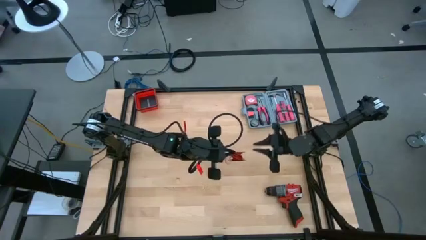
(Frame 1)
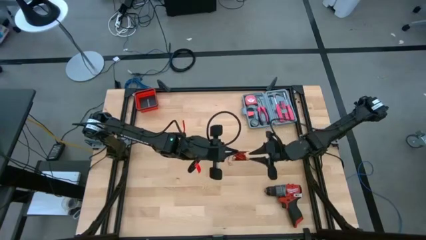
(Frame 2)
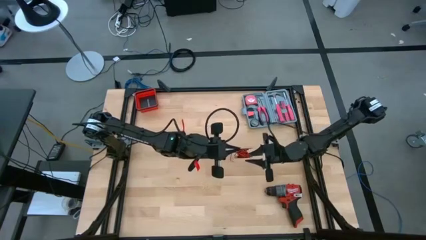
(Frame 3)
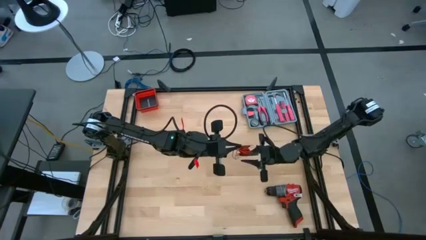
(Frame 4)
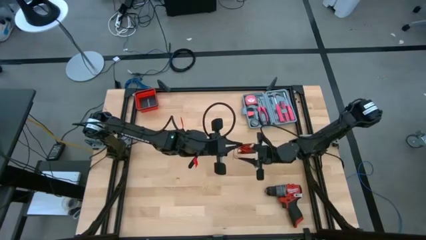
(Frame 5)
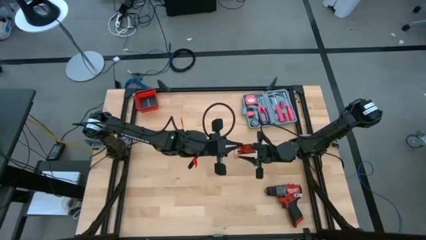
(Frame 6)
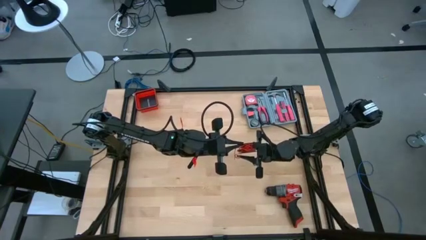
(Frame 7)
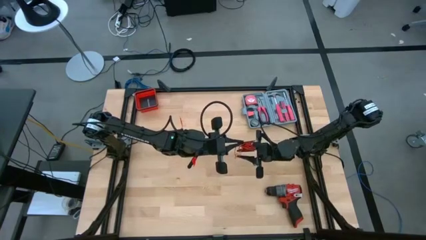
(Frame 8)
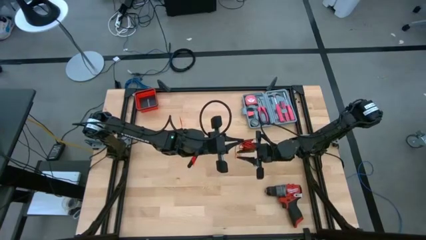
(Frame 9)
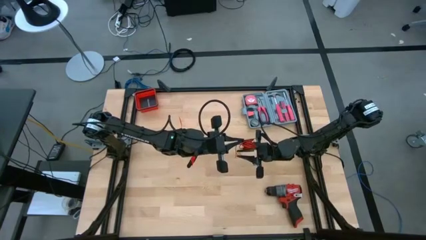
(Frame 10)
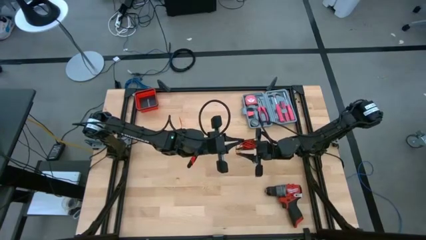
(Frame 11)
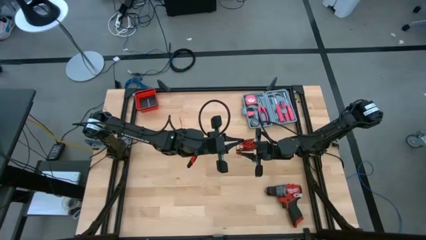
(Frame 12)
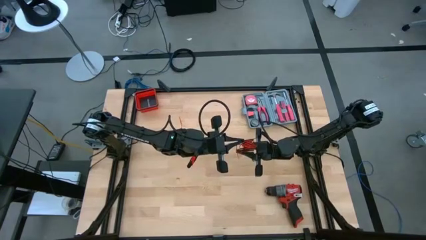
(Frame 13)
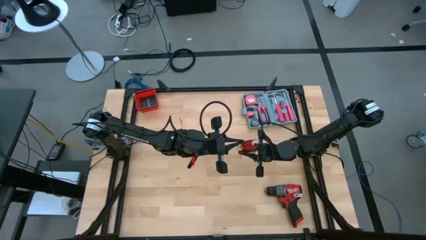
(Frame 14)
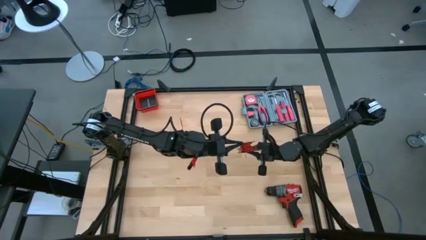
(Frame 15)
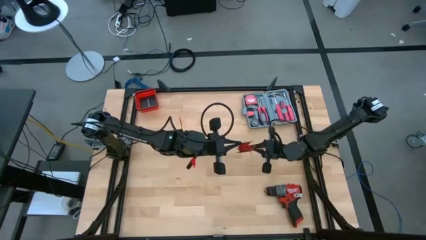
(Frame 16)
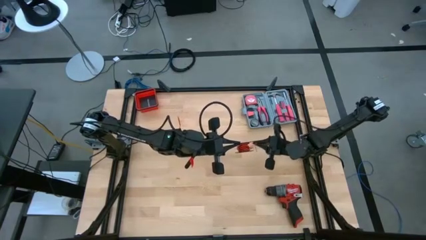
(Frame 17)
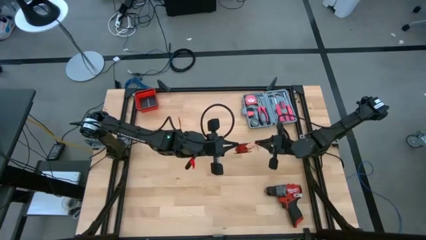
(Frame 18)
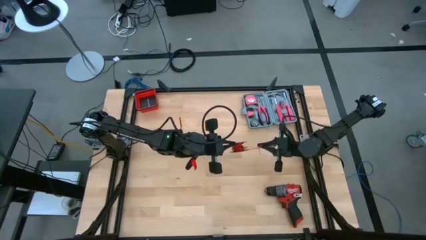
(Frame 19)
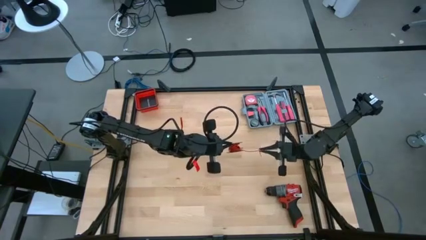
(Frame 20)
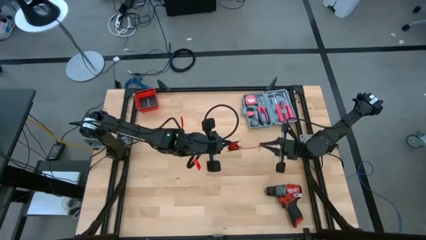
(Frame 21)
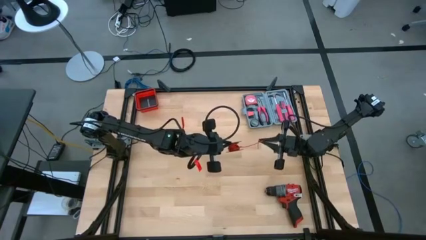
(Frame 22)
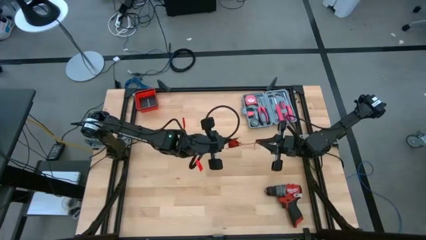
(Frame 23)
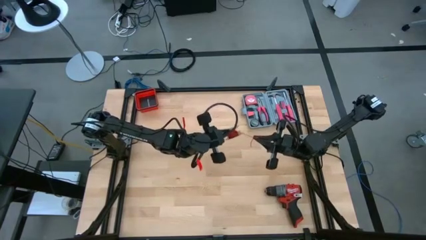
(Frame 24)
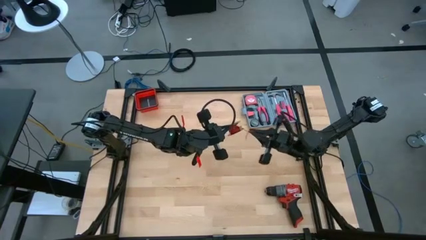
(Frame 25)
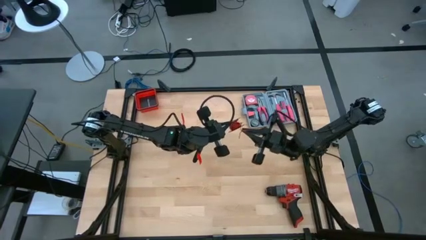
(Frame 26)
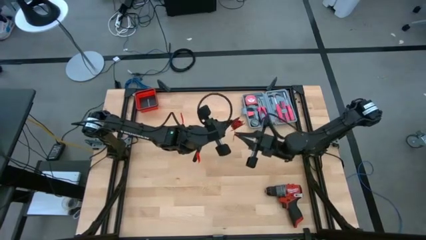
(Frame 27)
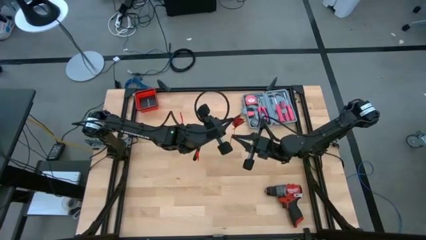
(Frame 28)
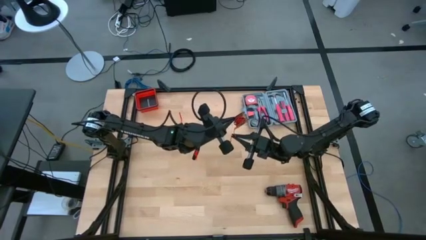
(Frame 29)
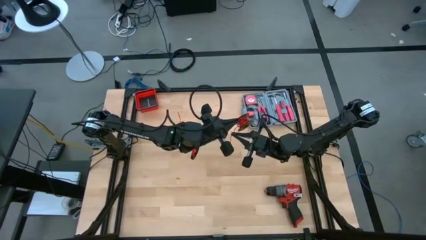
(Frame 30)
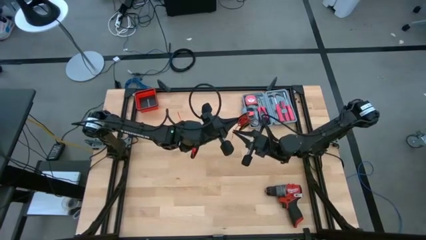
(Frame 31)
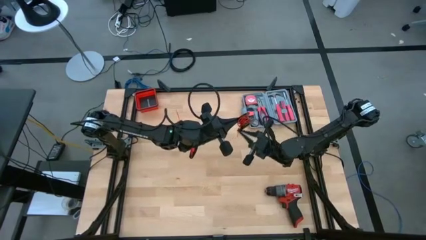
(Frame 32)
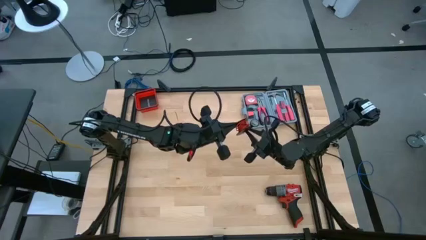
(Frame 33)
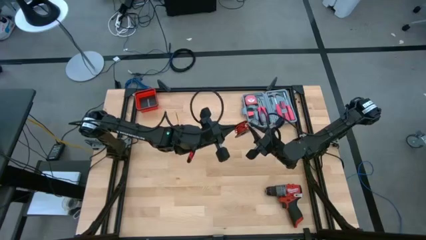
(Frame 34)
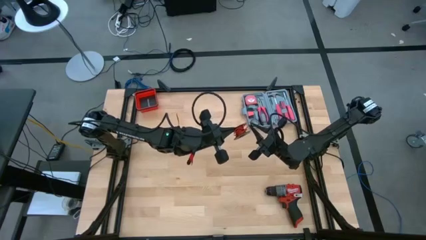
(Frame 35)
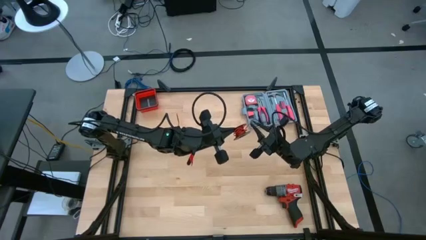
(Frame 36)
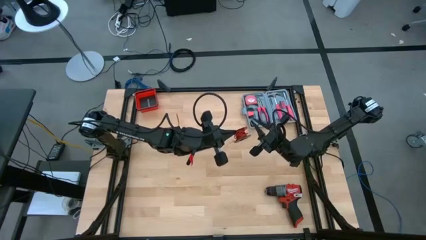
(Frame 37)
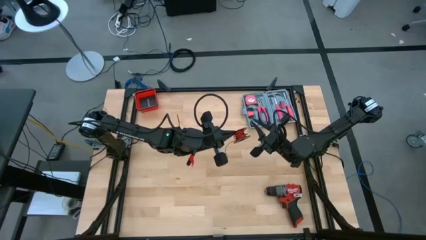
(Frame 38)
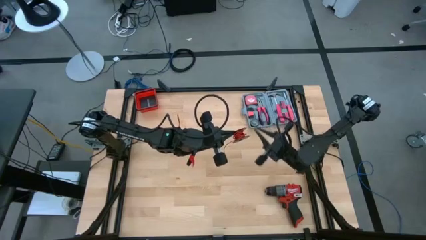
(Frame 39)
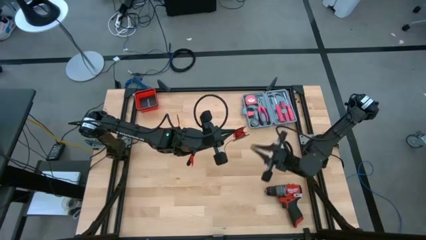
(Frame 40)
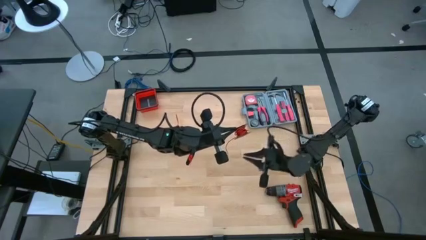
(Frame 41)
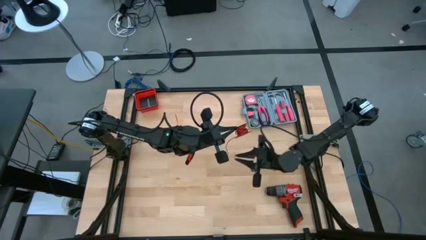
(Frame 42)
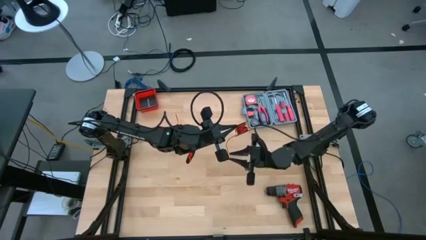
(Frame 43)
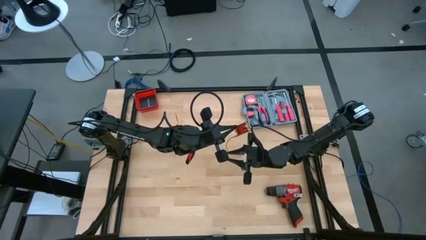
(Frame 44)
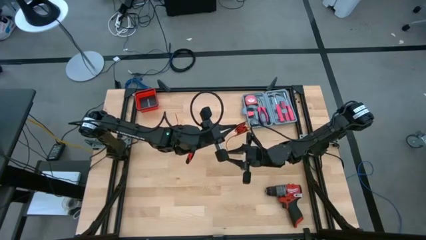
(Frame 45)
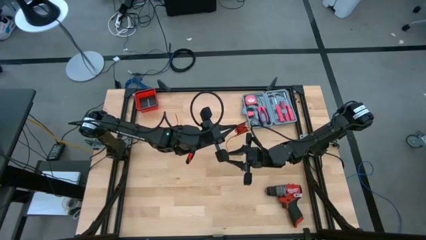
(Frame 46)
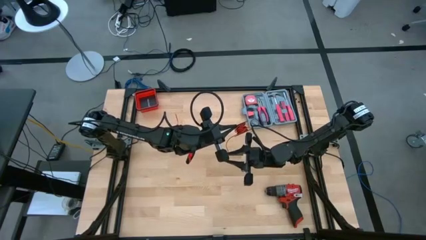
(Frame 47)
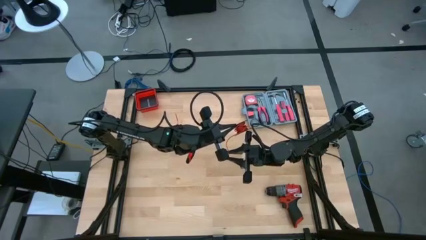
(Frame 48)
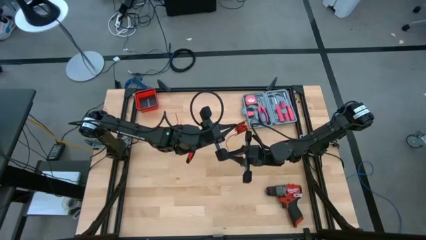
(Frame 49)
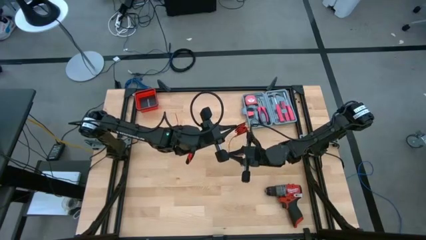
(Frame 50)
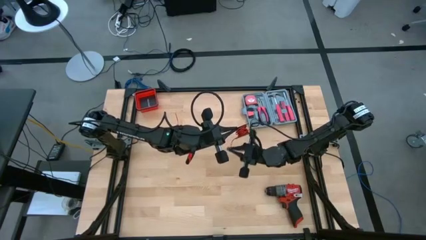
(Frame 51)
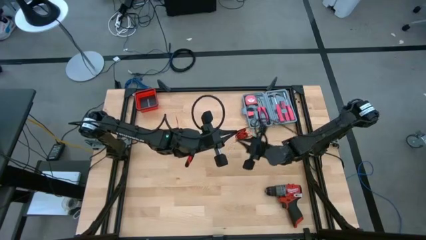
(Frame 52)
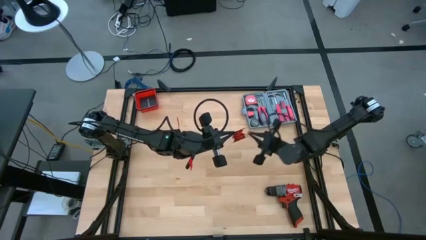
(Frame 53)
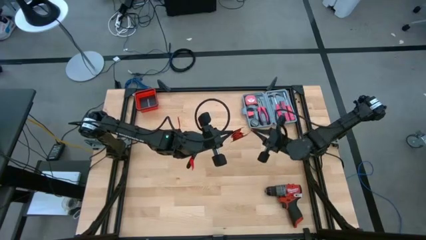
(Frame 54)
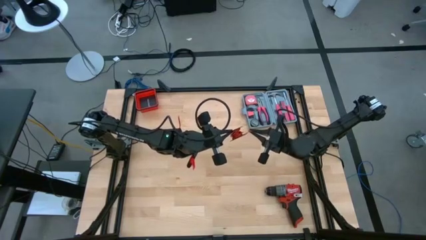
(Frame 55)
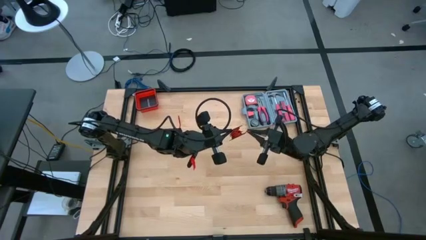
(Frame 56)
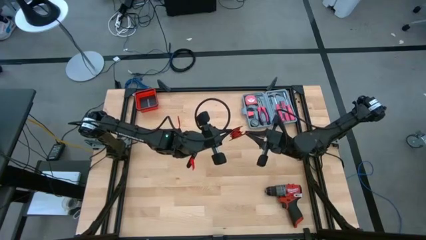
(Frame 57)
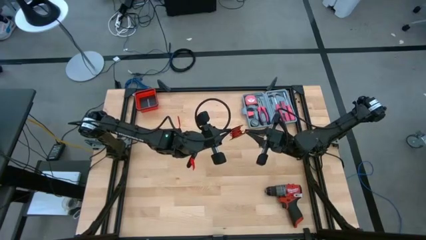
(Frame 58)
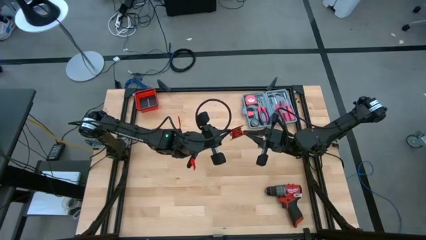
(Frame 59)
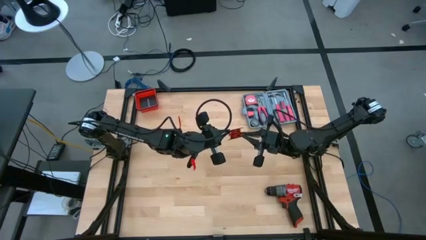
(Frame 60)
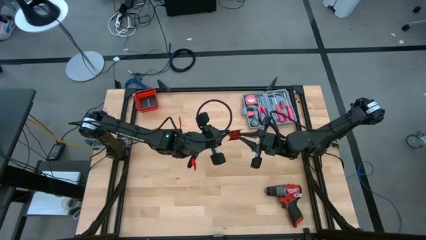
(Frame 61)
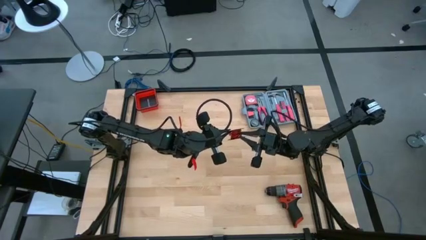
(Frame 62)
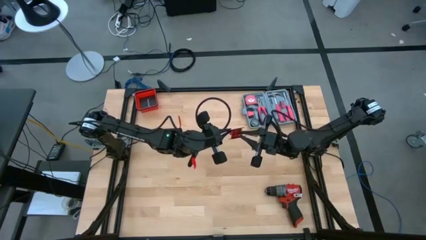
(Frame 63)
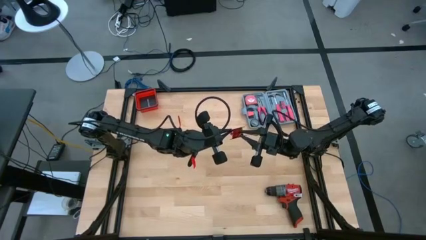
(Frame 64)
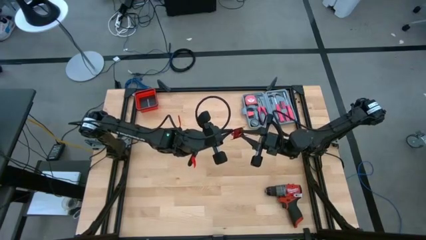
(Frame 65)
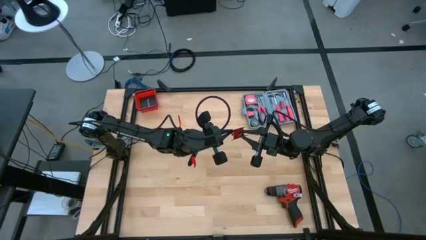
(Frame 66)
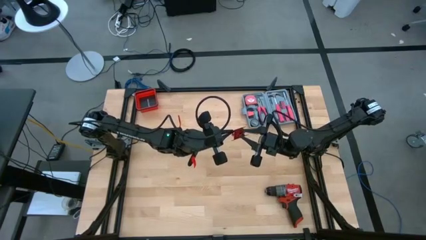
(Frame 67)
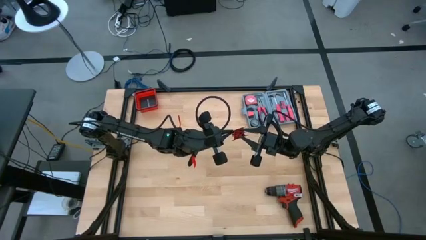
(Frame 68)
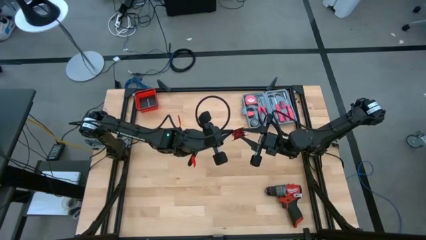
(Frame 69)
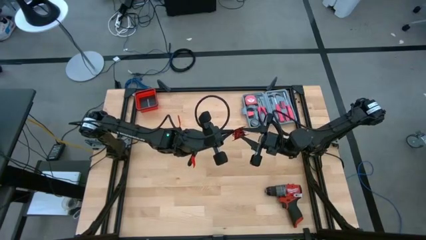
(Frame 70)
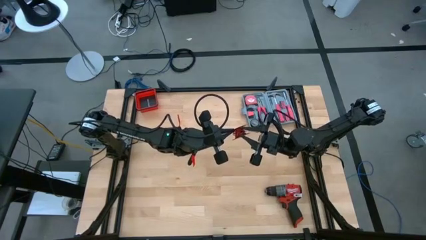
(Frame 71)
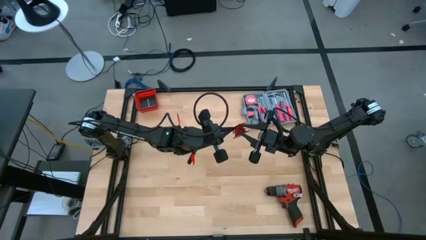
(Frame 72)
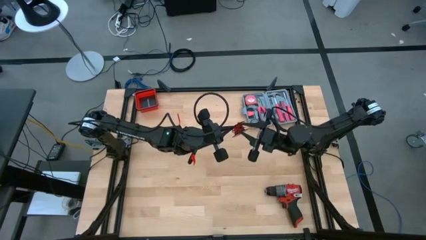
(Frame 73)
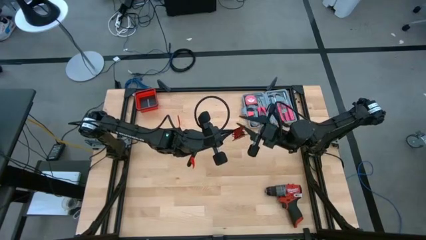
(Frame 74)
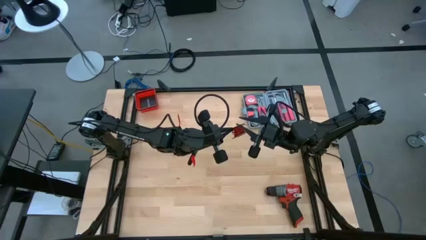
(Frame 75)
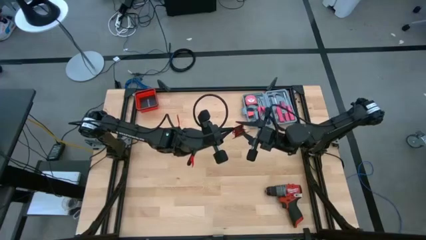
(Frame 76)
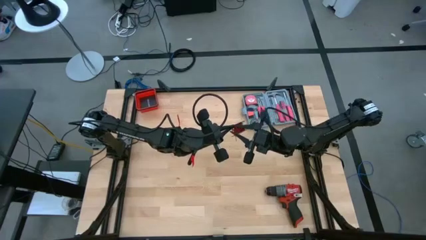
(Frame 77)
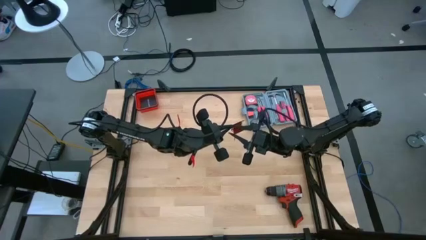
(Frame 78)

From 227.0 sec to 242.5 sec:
Task: Coil cords
Coil the red wire onto the black spool

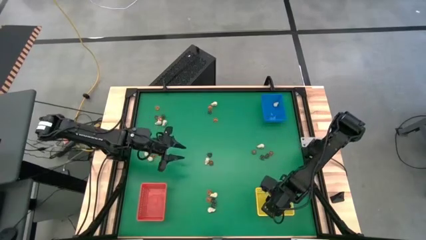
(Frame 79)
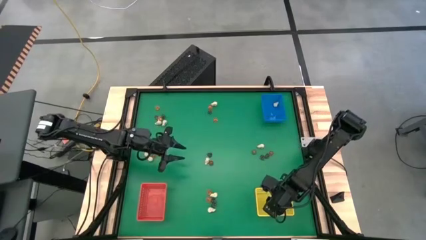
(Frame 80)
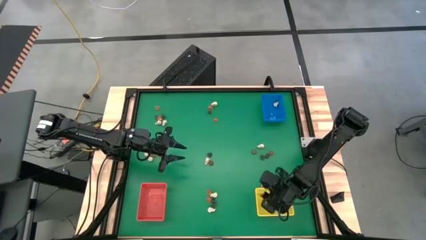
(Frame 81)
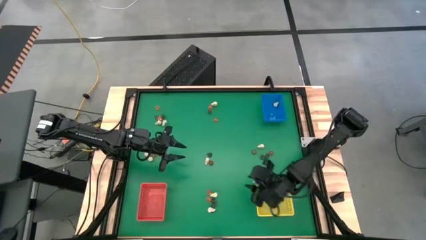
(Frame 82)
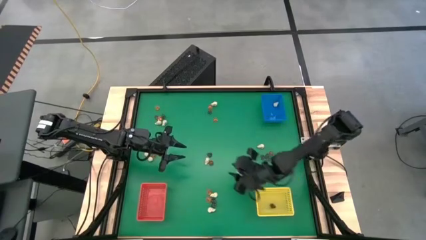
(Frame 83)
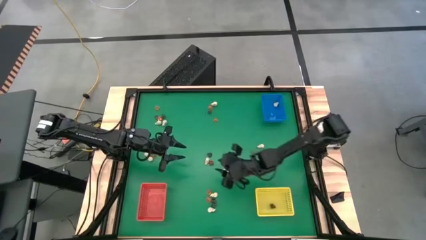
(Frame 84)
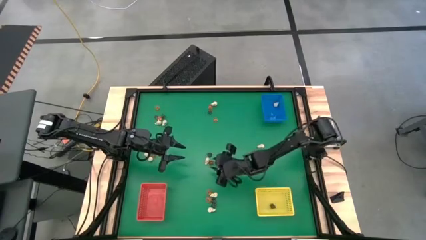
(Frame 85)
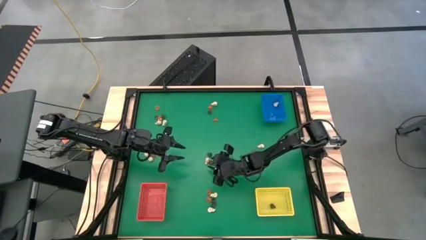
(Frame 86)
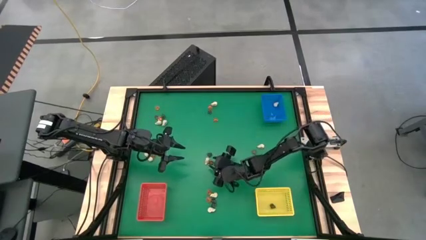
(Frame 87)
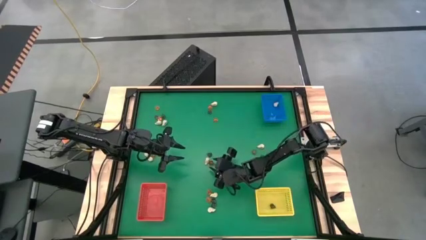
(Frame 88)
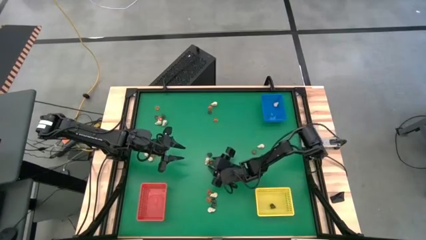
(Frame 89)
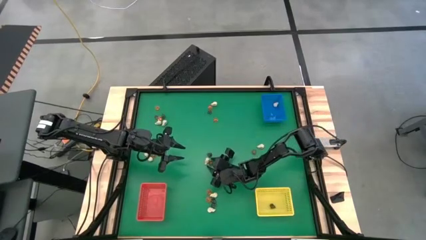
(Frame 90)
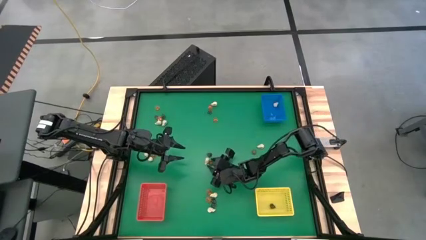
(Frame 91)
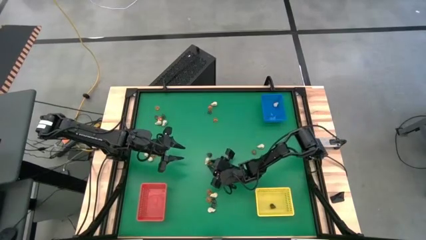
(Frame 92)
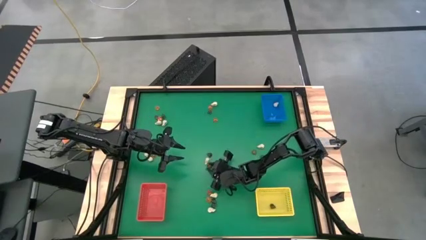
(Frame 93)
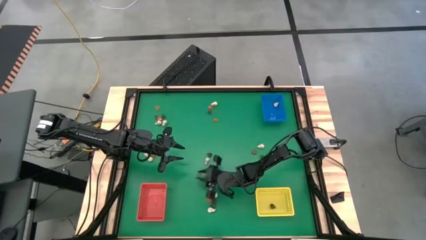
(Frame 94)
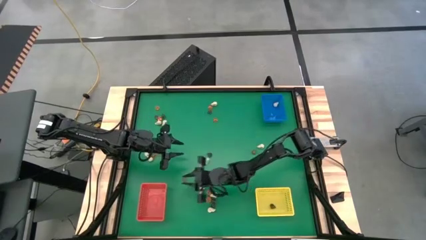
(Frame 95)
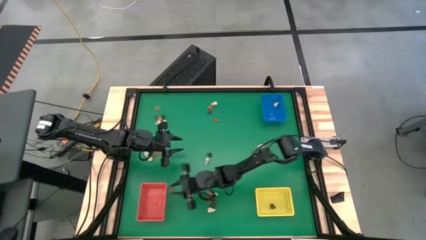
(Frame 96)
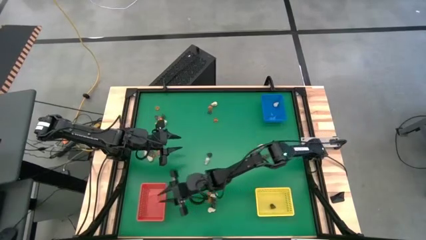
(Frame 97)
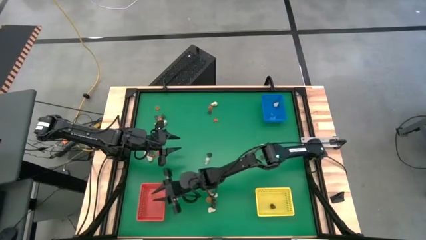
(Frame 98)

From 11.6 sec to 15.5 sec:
Task: Sort Halloween decoration
Put the orange pumpkin toy into the red bin
